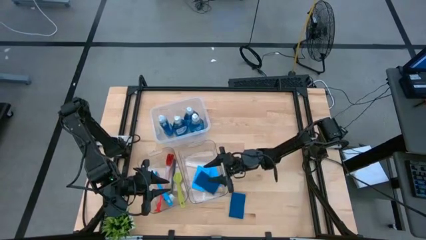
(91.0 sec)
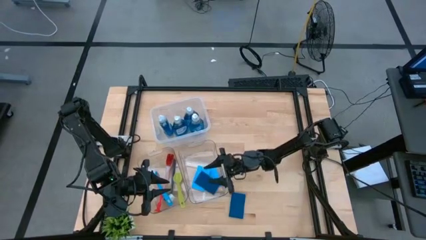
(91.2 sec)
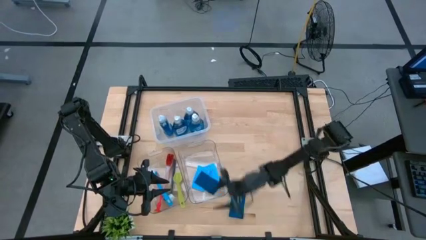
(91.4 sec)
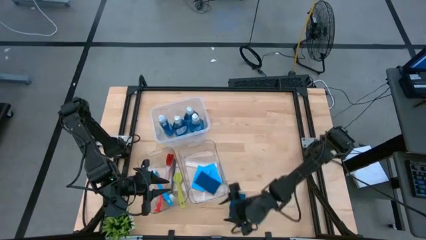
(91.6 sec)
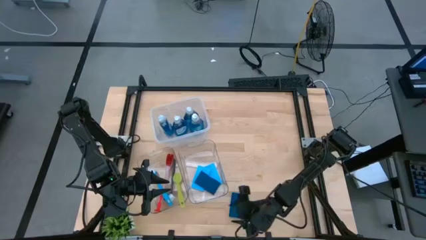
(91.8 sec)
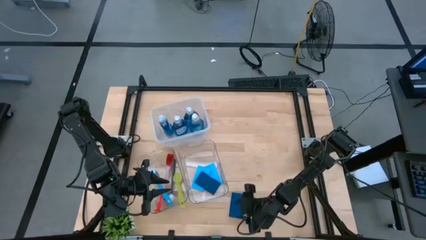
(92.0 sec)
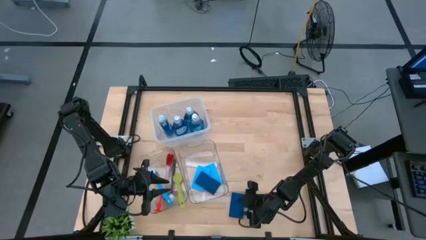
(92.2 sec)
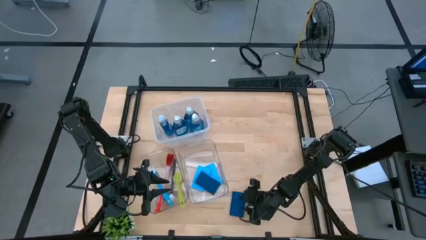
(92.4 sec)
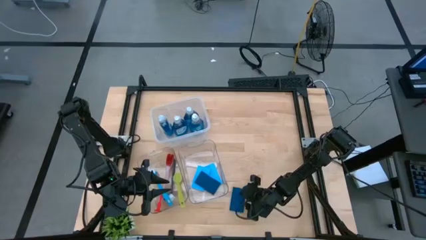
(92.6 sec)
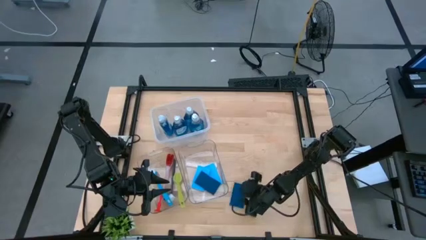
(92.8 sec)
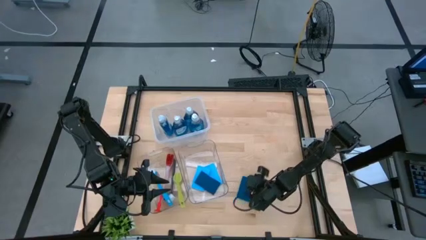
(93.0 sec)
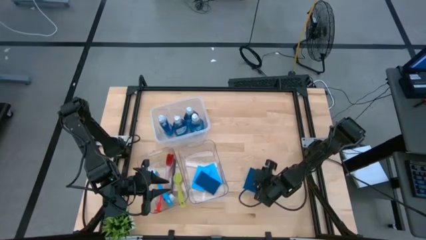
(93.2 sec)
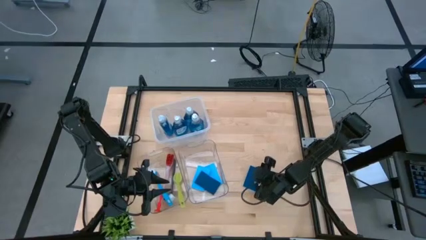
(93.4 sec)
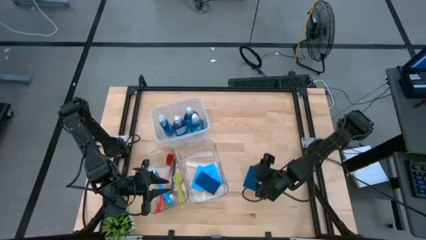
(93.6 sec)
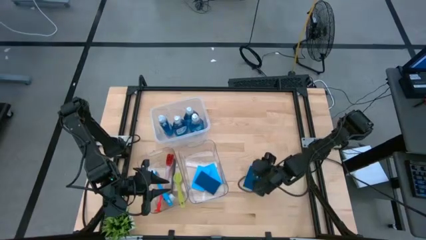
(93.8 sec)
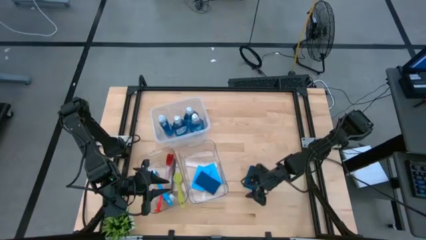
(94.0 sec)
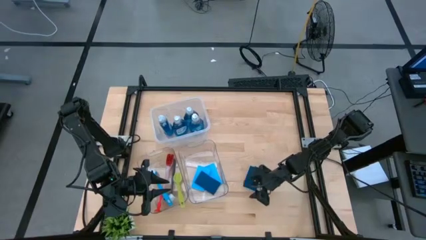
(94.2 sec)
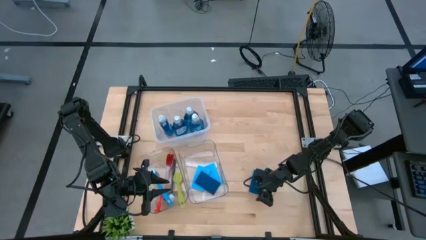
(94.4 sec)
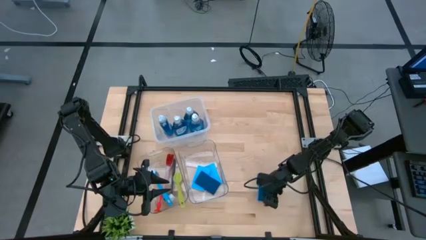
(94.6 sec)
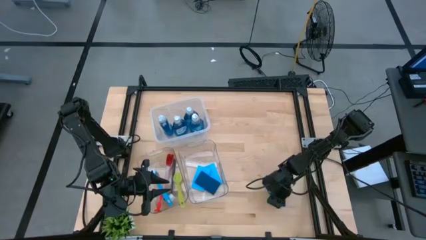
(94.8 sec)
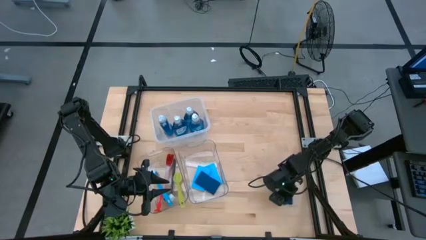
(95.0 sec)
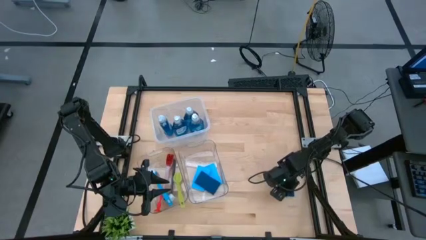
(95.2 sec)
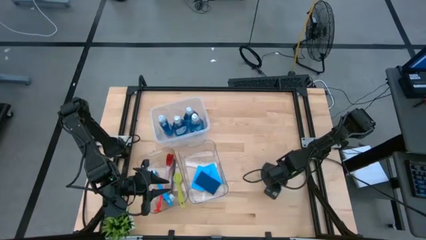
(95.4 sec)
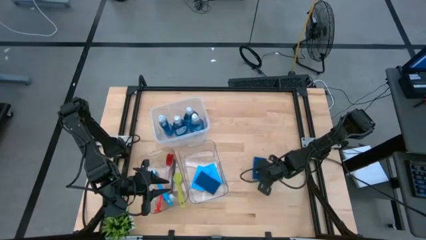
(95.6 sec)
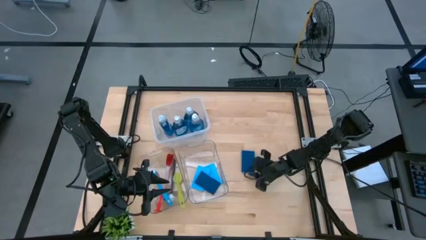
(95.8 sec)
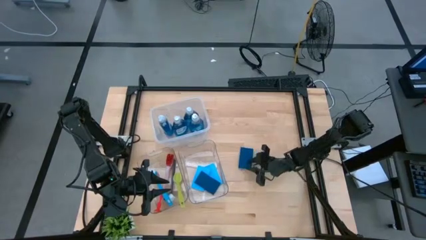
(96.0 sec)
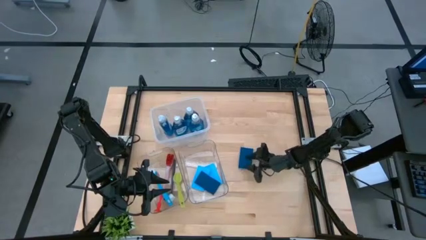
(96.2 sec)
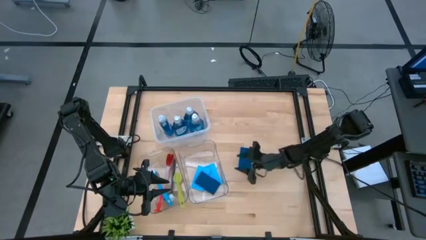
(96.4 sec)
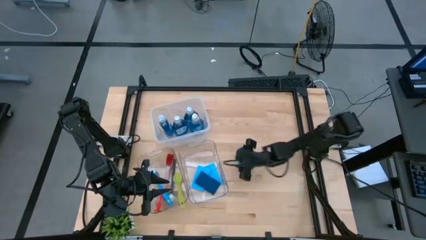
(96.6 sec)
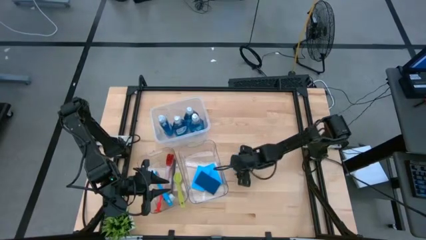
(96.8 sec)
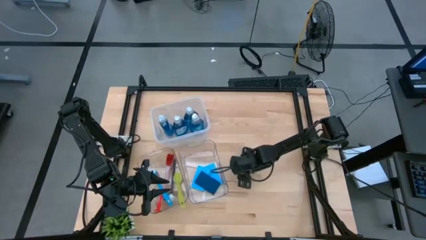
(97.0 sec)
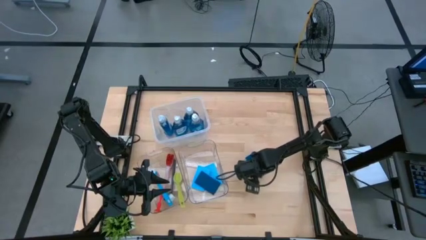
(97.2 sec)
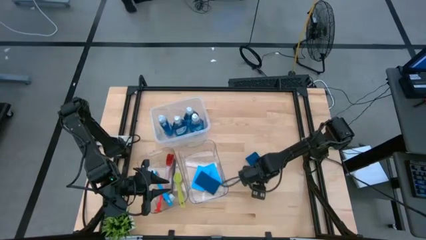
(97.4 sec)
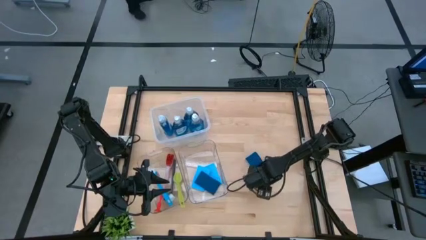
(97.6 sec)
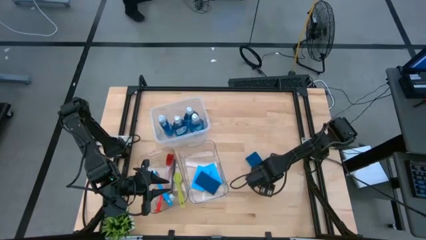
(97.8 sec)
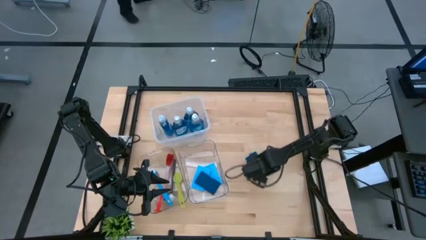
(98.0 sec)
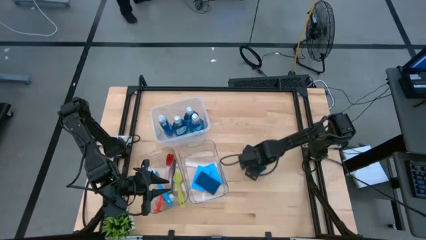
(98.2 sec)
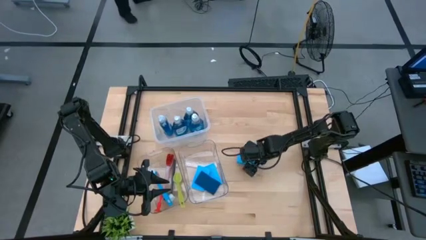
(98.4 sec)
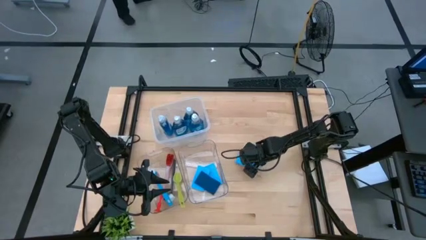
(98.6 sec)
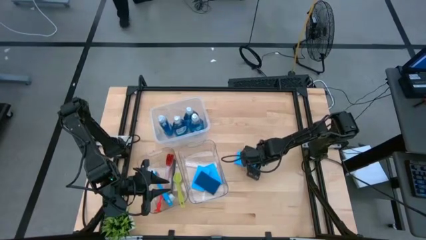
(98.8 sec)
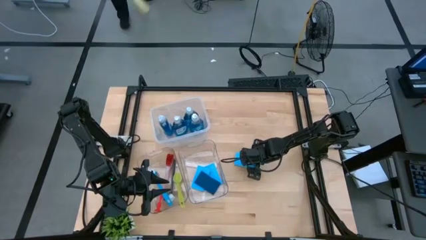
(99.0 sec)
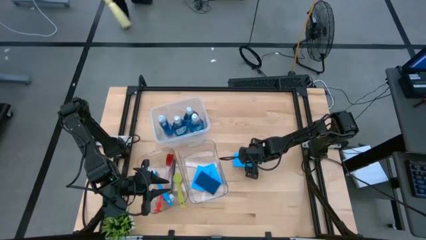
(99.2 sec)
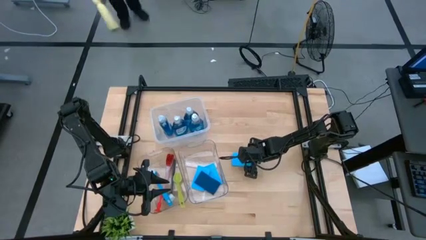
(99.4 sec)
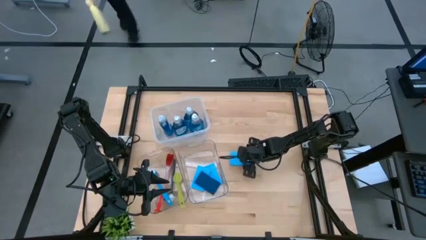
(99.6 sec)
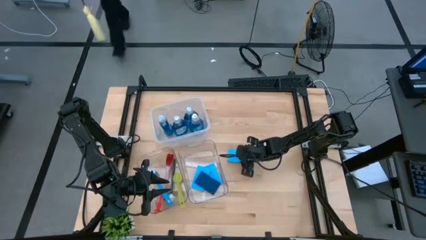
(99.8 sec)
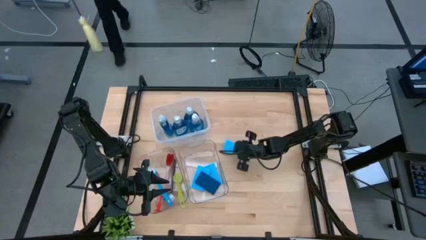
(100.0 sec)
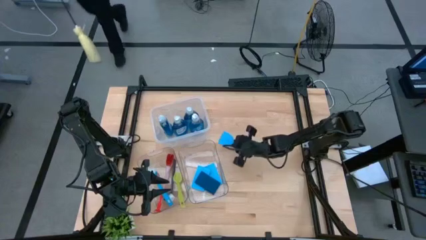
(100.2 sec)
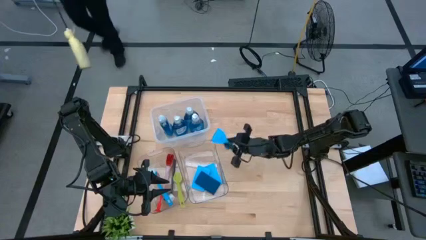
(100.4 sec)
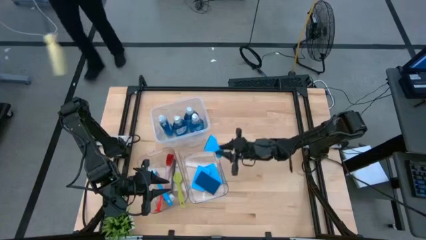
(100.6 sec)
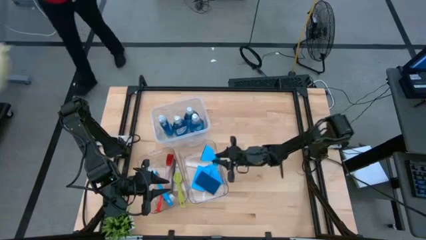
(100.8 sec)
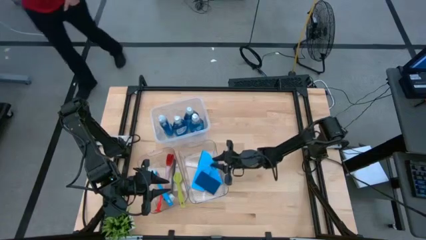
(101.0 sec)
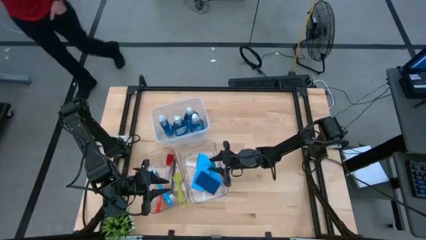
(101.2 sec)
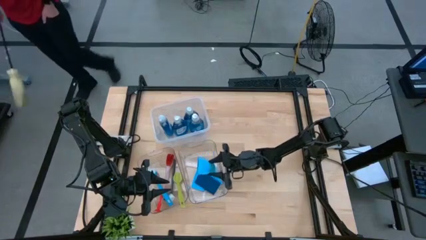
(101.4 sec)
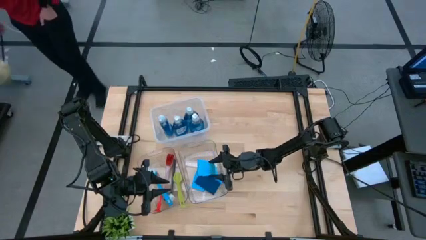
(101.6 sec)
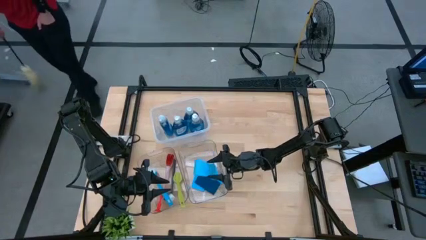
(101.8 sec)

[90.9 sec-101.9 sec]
Task: Pick & Place Kitchen Sink Supplies
Put the blue sponge wipe into the right transparent bin

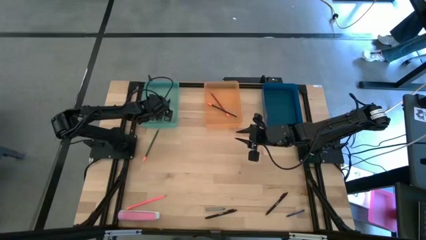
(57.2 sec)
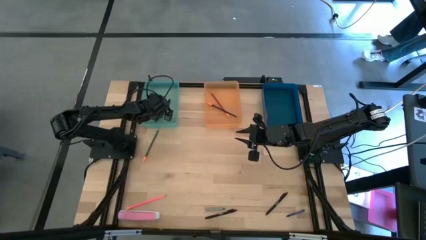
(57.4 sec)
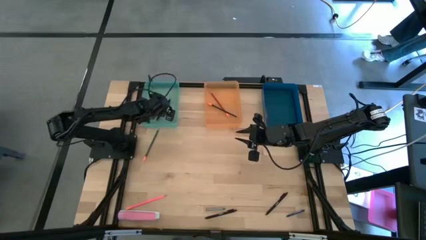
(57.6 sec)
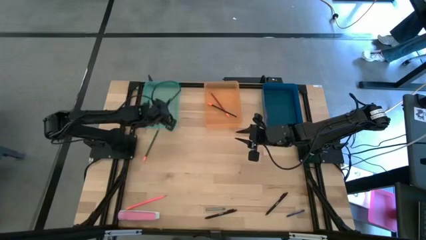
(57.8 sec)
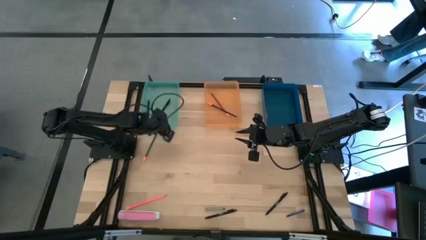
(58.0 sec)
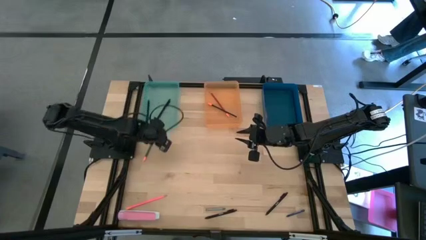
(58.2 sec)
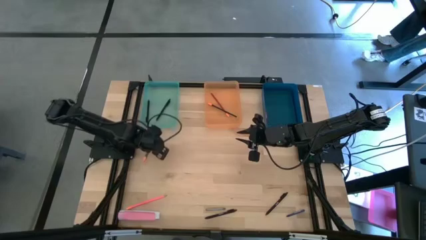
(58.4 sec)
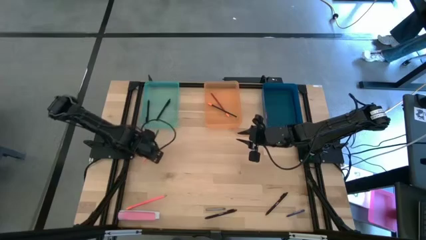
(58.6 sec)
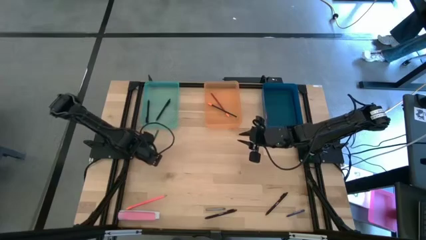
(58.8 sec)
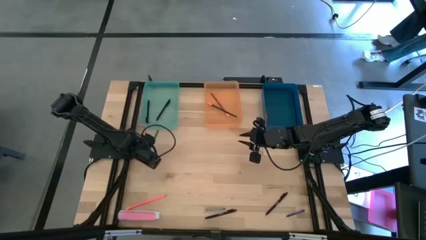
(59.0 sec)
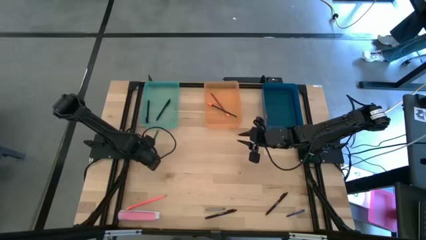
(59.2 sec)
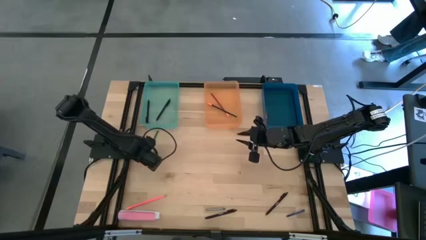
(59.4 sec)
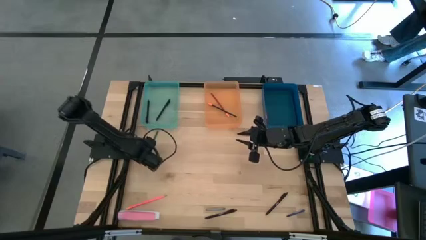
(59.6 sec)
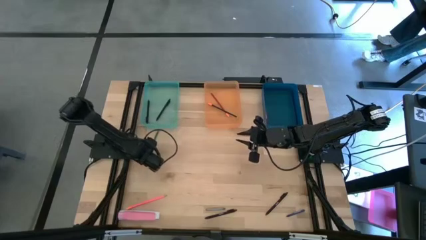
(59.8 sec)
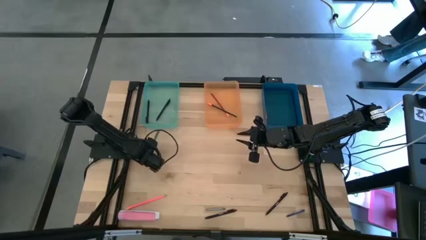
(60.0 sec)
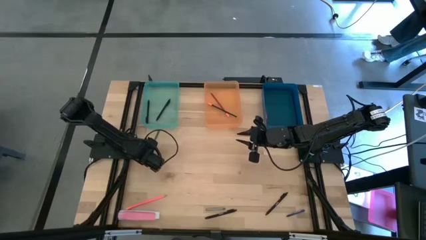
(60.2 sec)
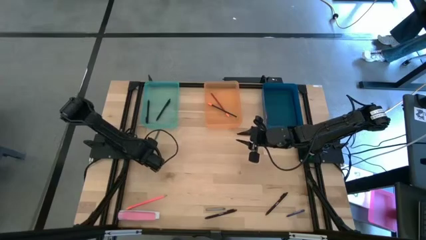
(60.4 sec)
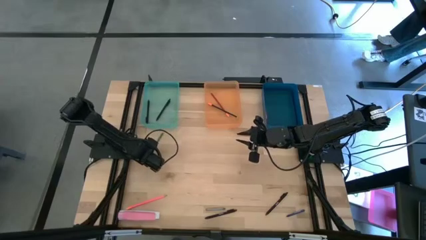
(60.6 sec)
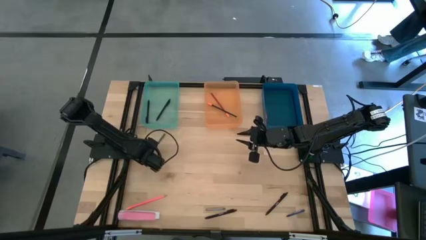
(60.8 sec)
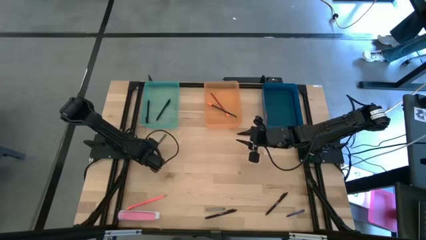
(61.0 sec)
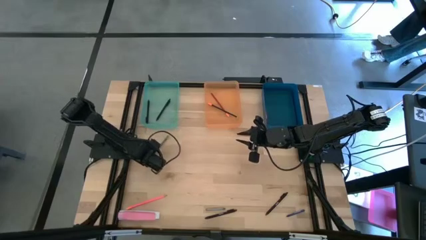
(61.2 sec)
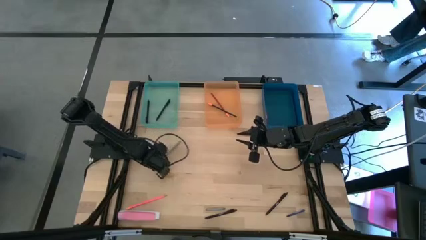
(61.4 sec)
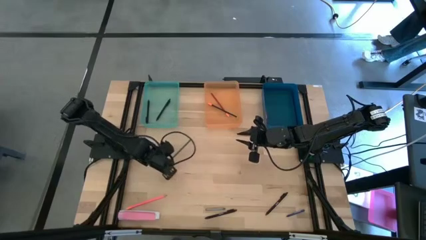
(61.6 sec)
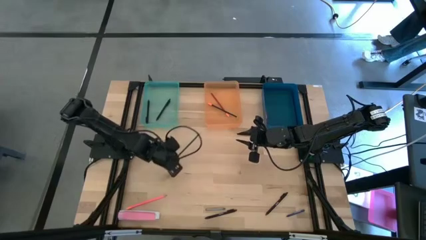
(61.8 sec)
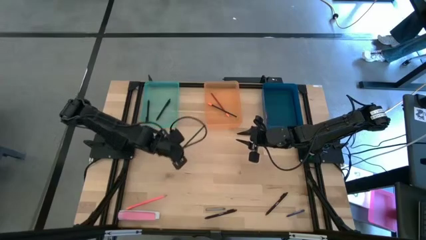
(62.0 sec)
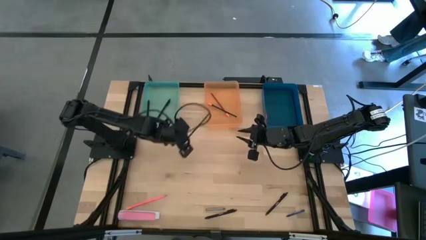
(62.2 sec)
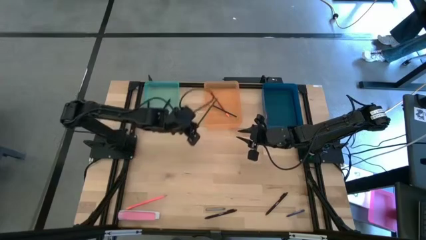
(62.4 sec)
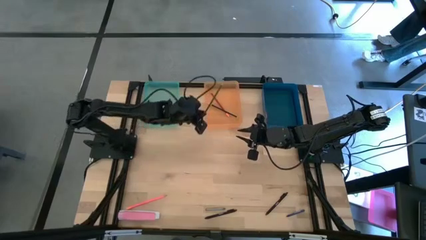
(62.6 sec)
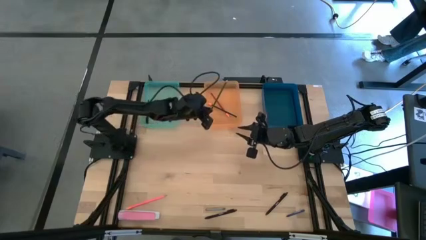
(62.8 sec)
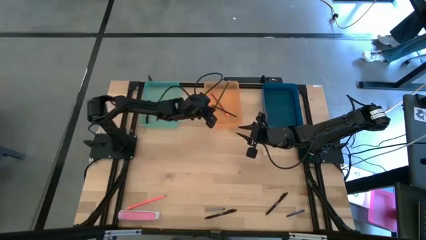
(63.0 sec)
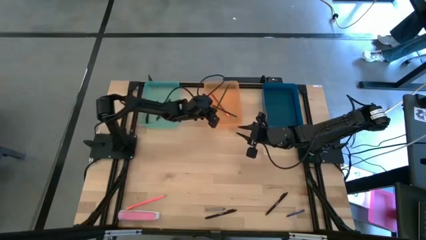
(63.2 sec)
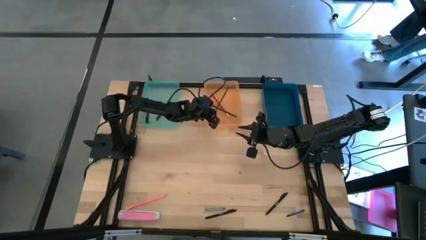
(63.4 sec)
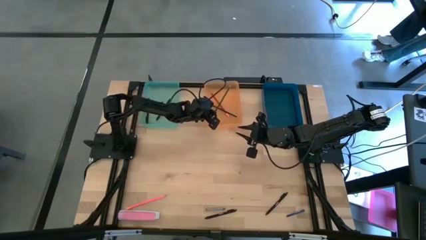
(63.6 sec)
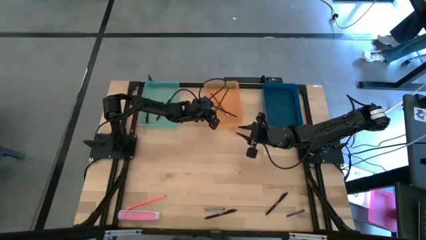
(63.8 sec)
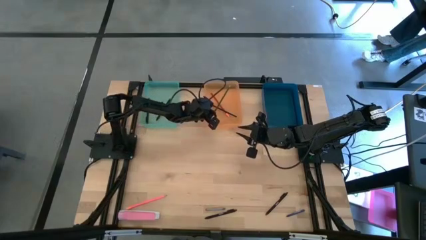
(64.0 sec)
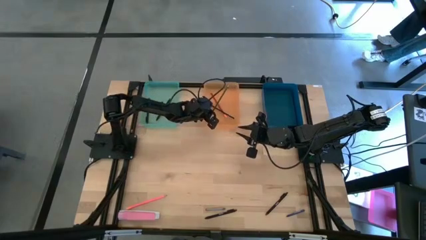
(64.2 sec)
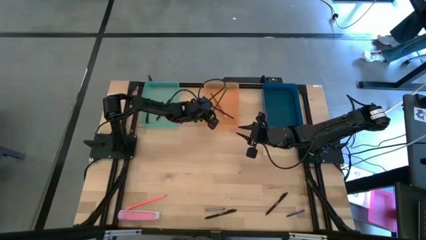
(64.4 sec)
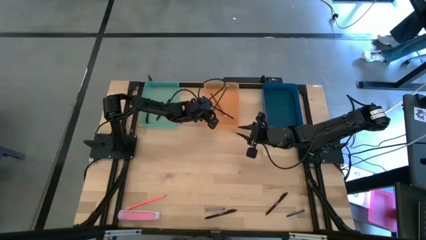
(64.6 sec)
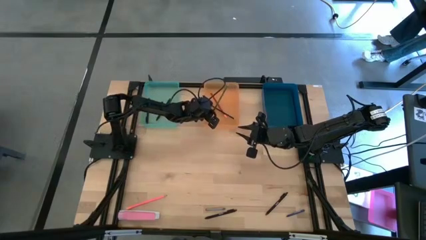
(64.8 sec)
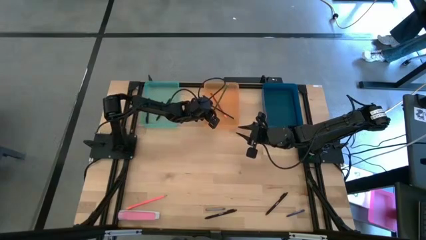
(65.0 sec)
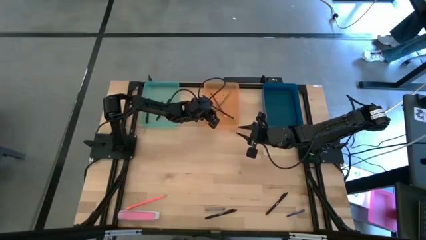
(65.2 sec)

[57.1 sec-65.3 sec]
Task: Sort crayons/erasers/pens/pencils in bins
Put the green pencil into the orange bin
